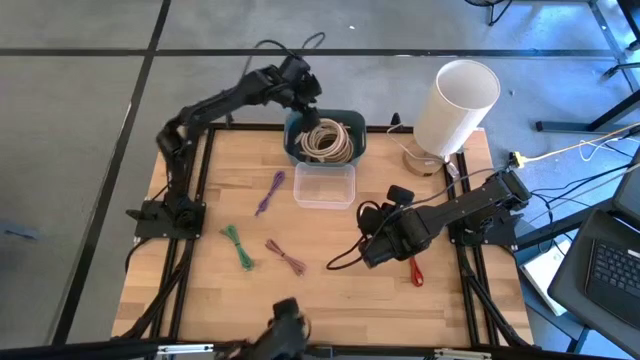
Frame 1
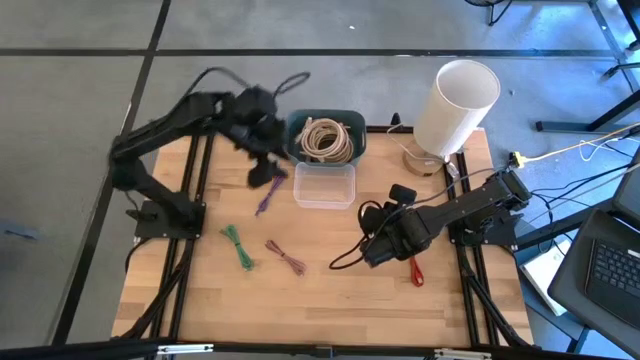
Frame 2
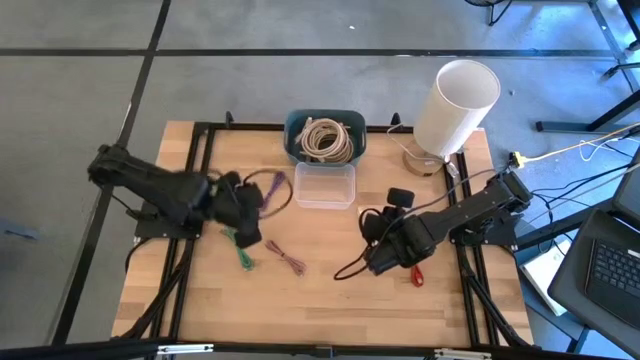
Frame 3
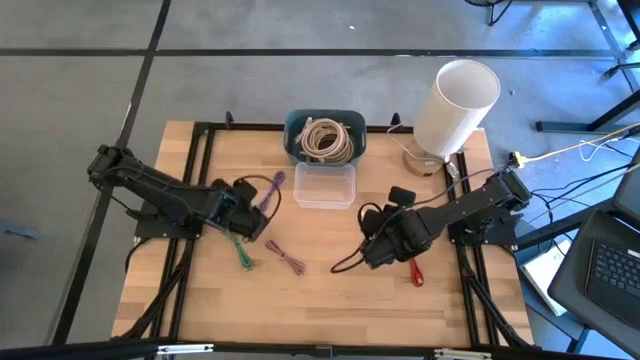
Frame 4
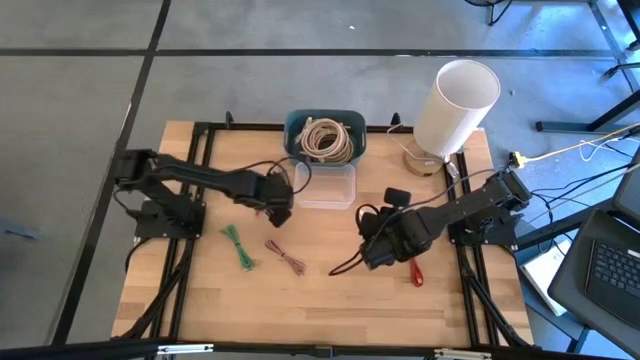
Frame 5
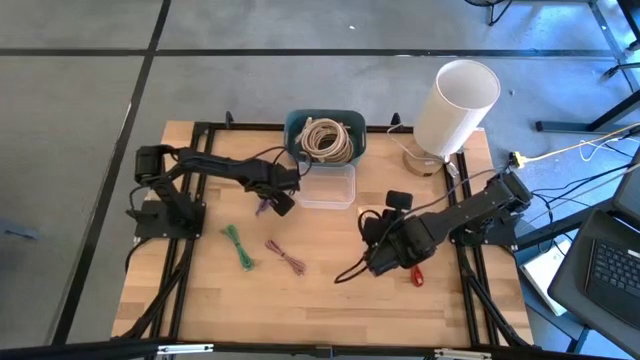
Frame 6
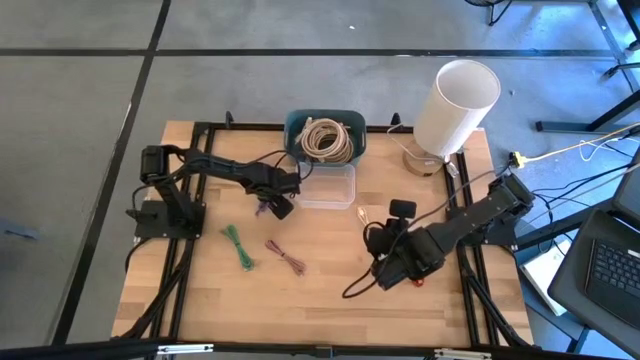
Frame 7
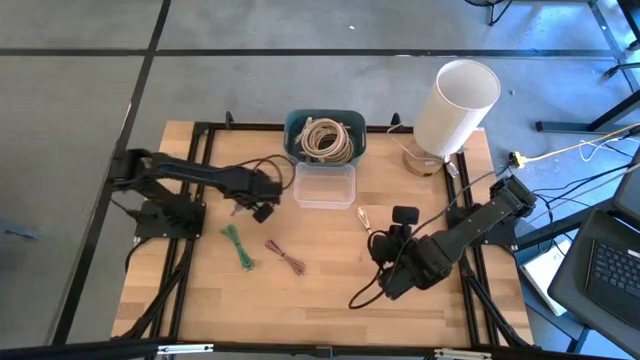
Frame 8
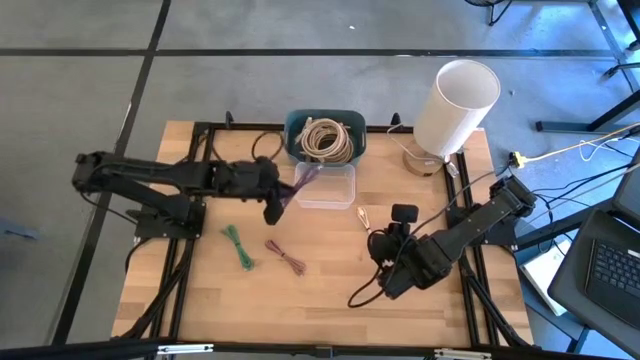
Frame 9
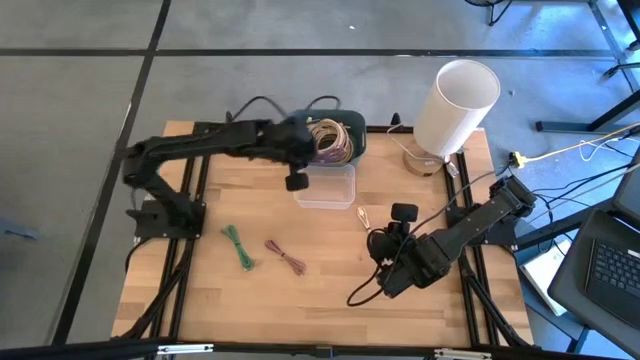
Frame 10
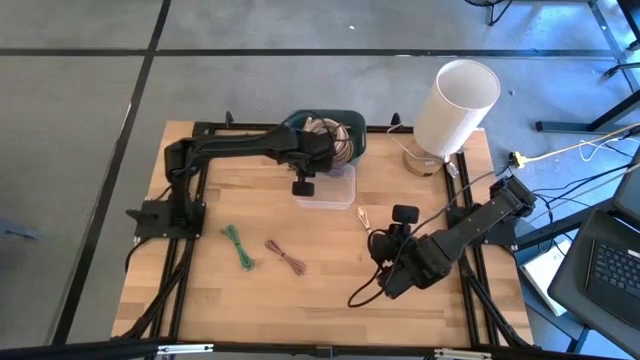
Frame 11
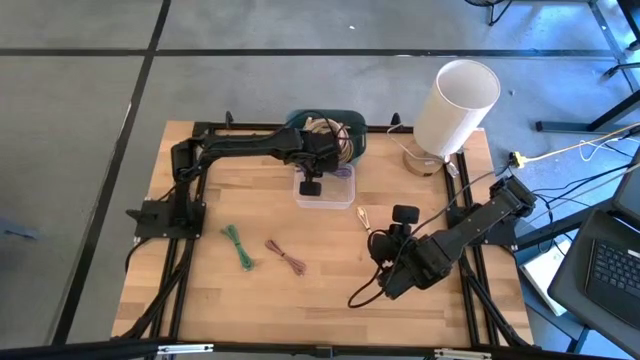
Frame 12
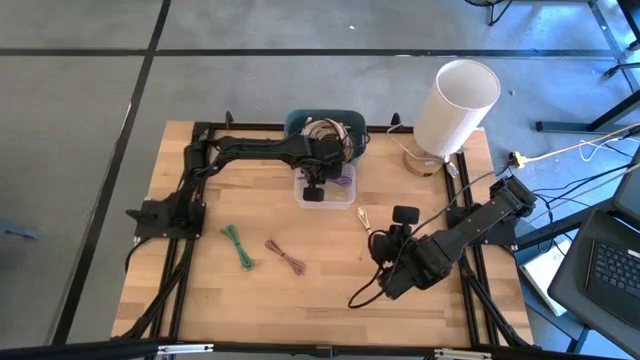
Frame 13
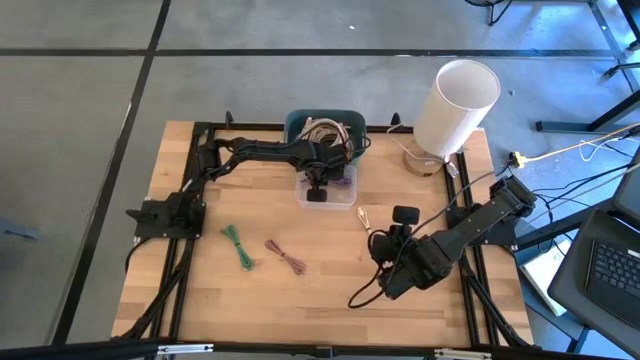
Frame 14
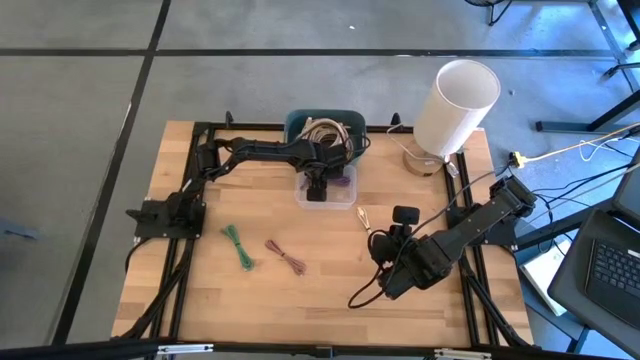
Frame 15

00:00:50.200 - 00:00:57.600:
Put the purple charger cable into the transparent bin

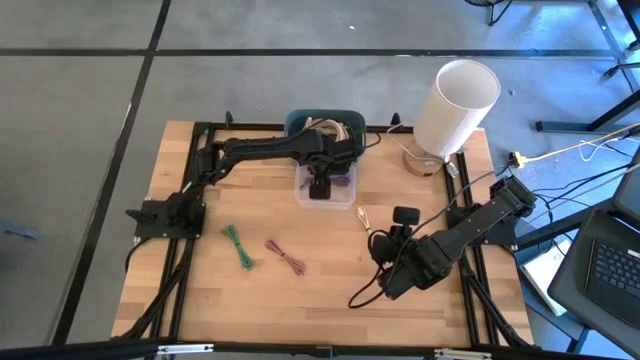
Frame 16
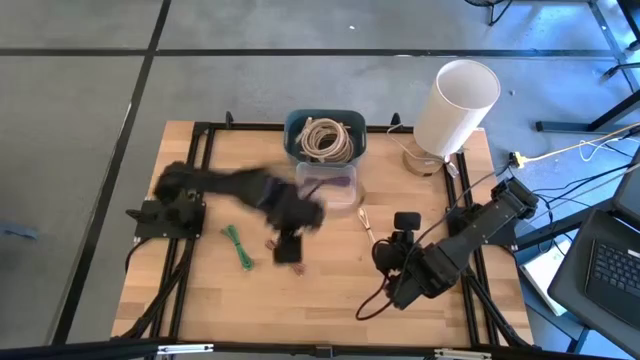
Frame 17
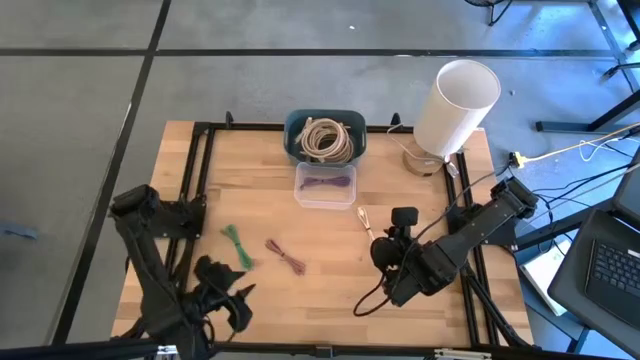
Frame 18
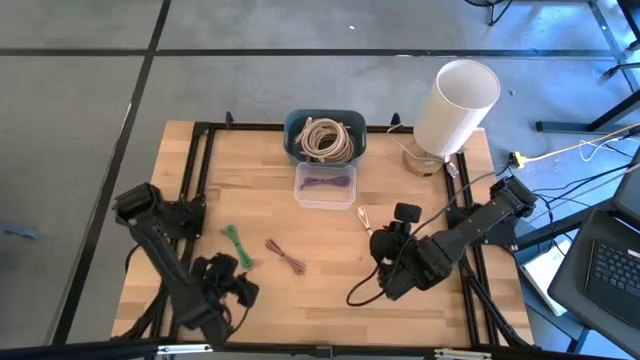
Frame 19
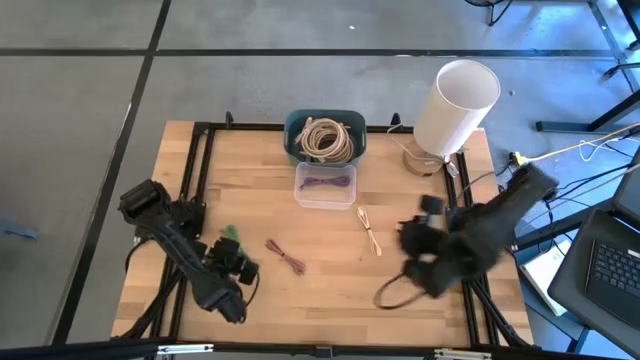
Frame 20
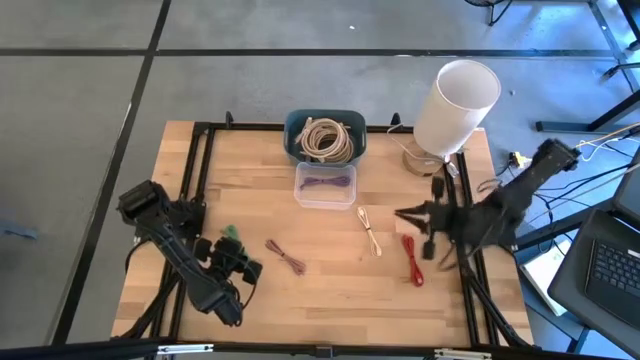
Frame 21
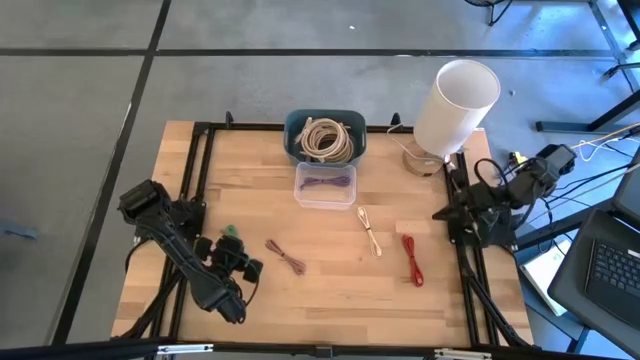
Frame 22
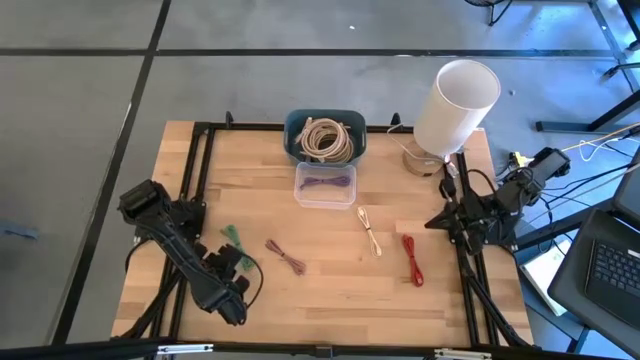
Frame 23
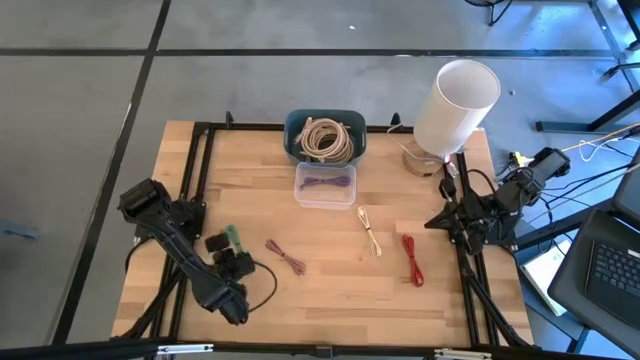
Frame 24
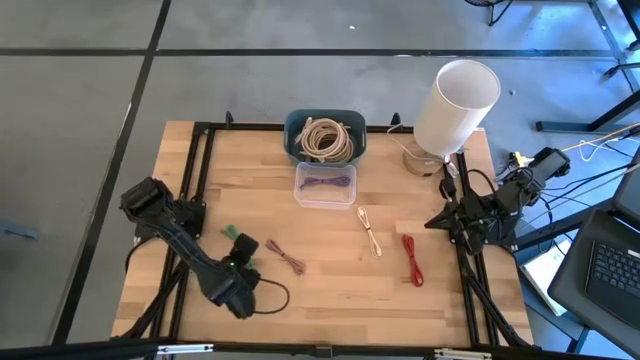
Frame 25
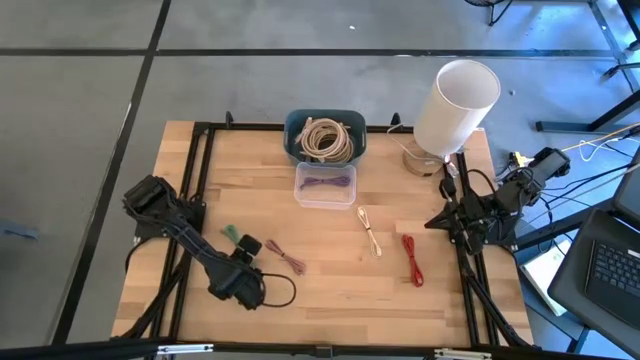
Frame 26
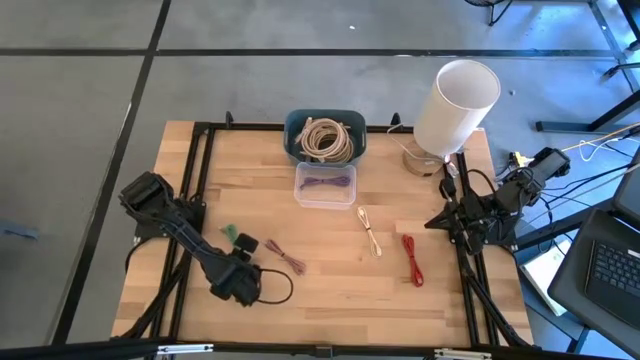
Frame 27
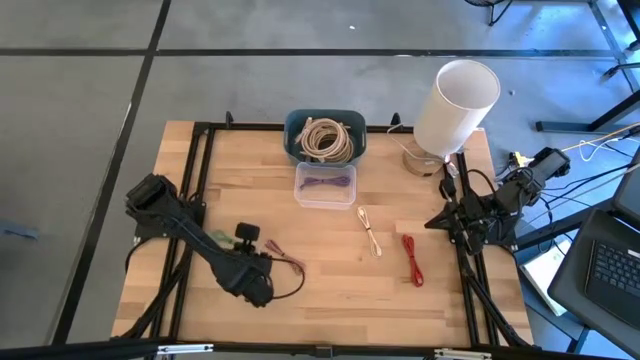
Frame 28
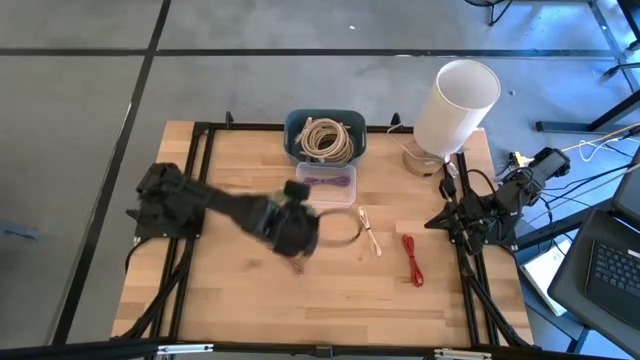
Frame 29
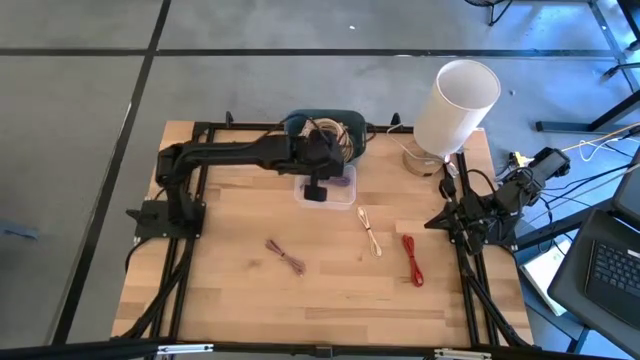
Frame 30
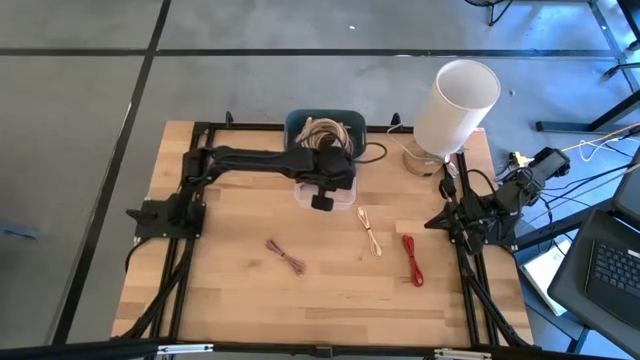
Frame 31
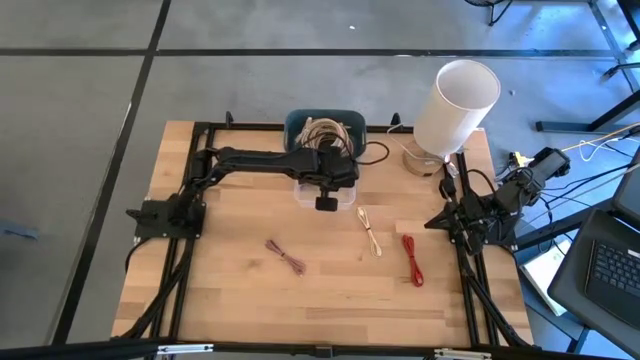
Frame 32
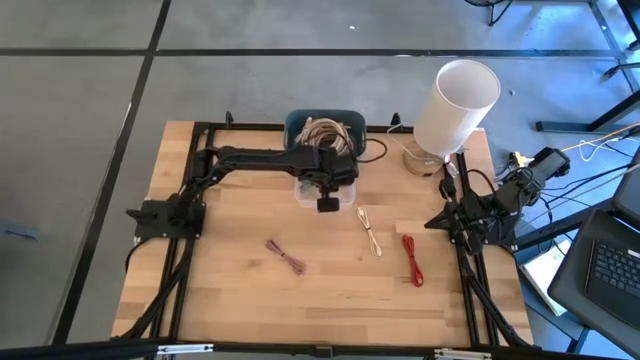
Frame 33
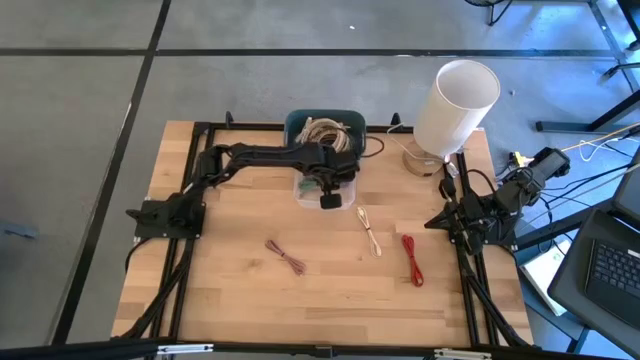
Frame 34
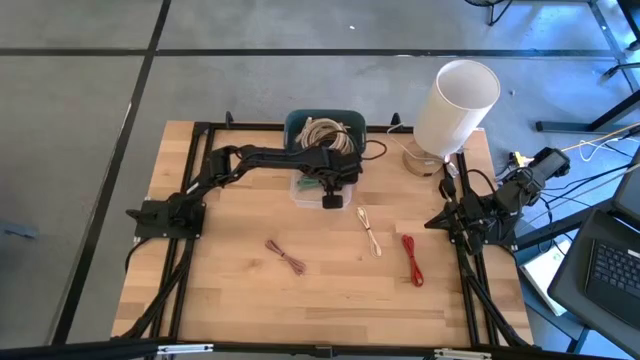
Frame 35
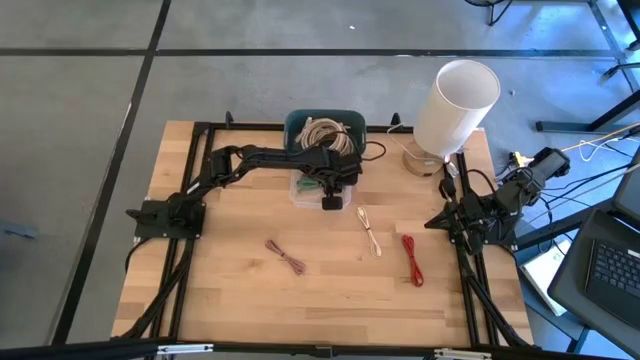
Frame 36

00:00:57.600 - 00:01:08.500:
Put the green charger cable into the transparent bin
